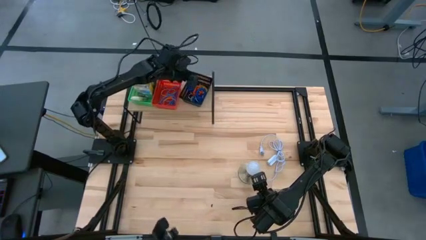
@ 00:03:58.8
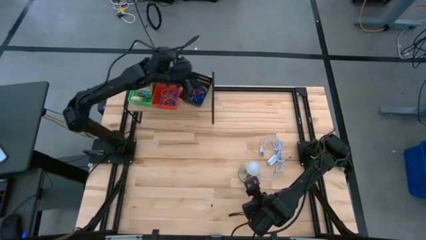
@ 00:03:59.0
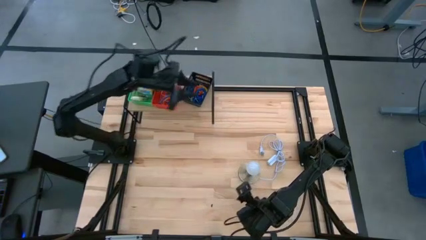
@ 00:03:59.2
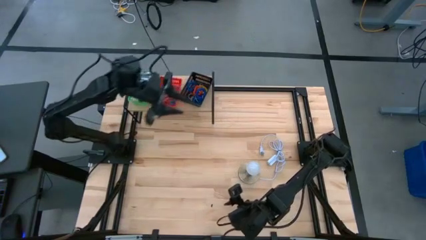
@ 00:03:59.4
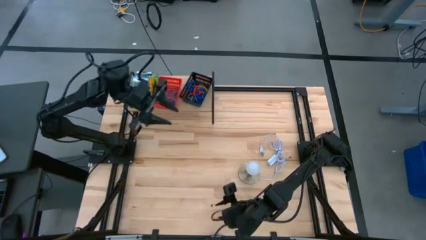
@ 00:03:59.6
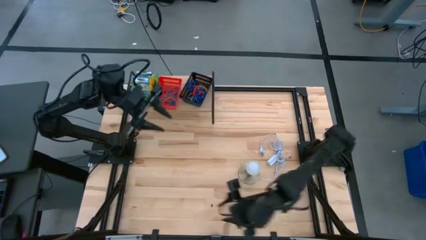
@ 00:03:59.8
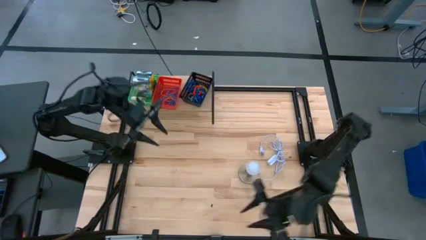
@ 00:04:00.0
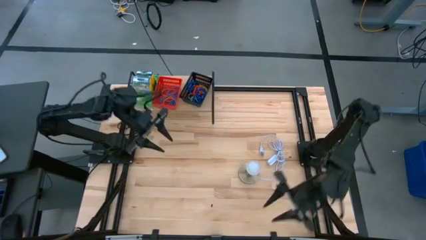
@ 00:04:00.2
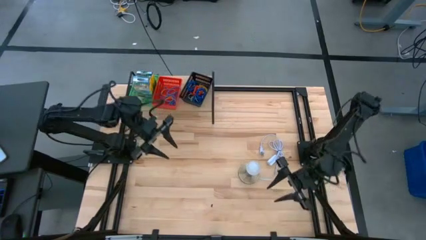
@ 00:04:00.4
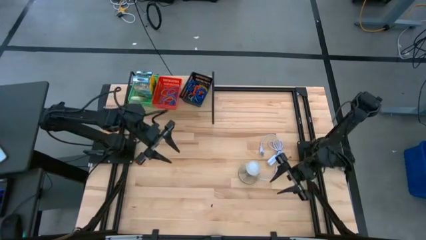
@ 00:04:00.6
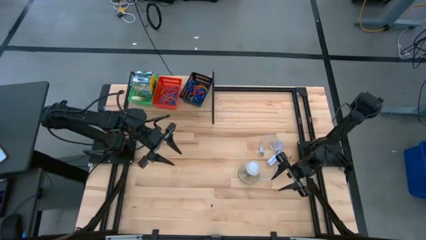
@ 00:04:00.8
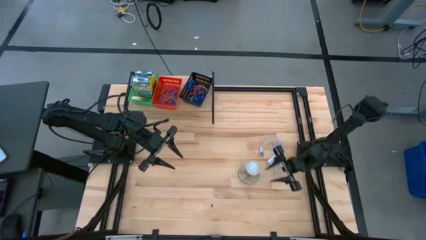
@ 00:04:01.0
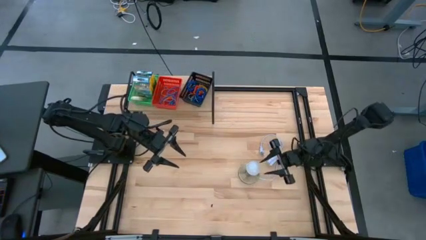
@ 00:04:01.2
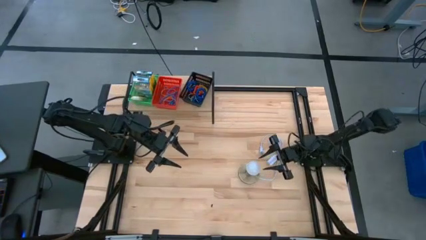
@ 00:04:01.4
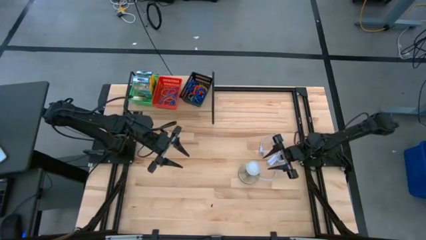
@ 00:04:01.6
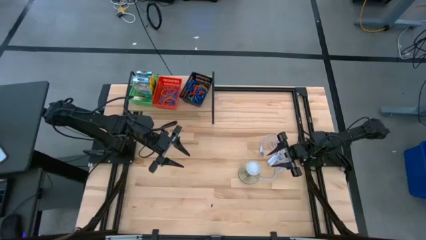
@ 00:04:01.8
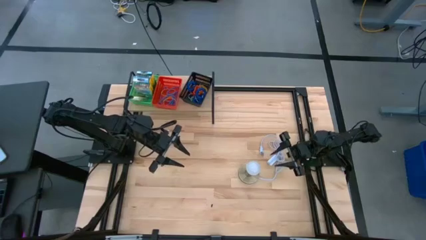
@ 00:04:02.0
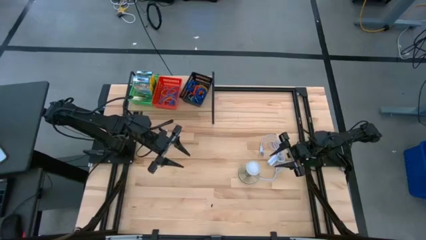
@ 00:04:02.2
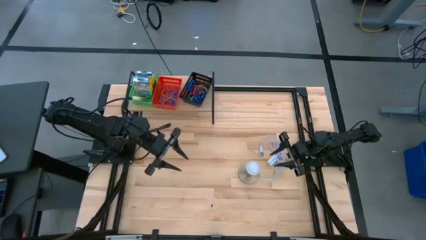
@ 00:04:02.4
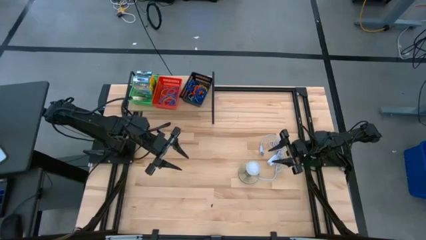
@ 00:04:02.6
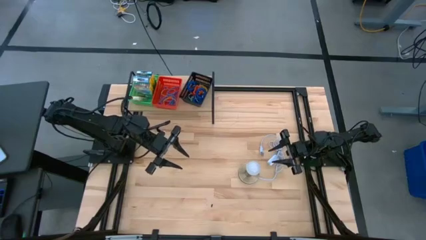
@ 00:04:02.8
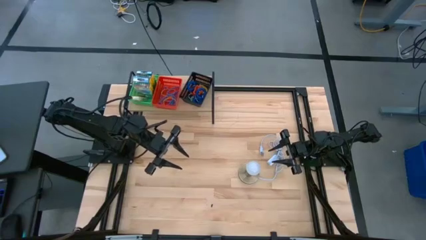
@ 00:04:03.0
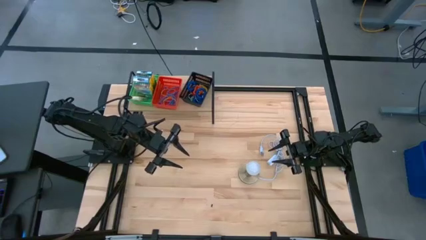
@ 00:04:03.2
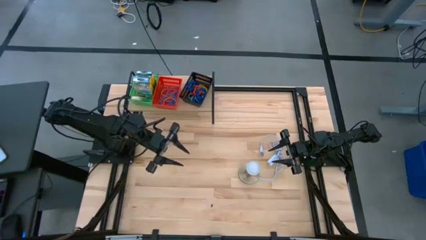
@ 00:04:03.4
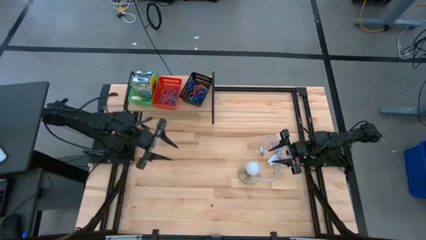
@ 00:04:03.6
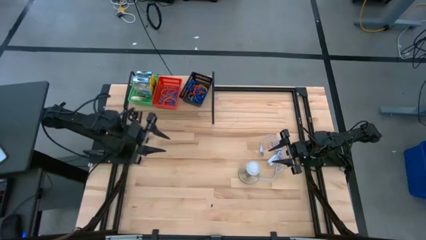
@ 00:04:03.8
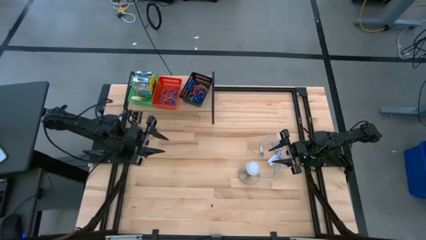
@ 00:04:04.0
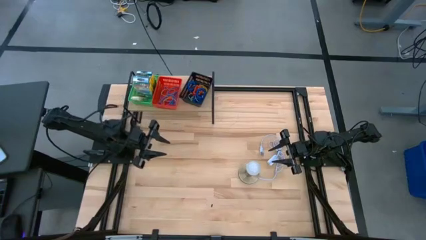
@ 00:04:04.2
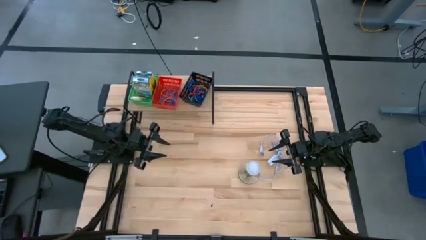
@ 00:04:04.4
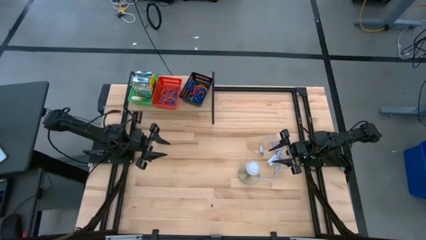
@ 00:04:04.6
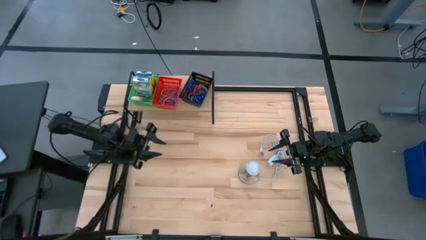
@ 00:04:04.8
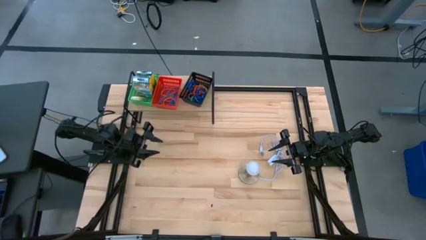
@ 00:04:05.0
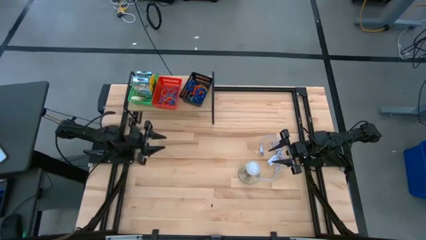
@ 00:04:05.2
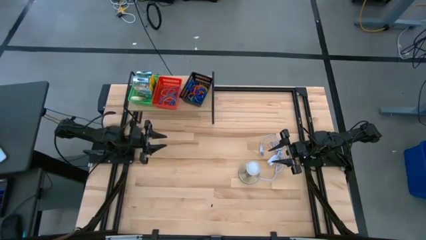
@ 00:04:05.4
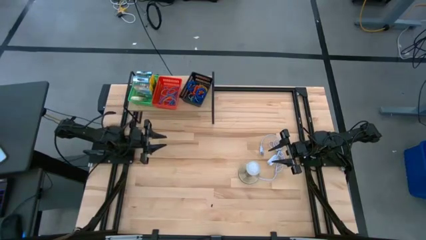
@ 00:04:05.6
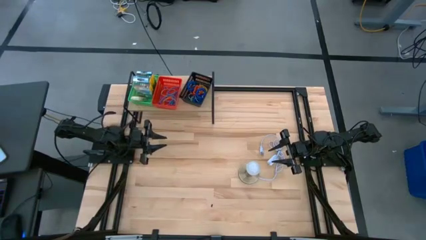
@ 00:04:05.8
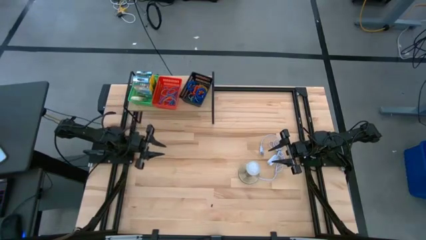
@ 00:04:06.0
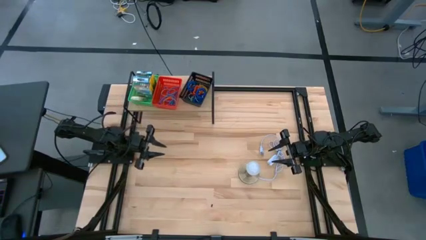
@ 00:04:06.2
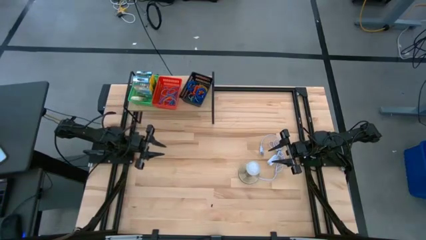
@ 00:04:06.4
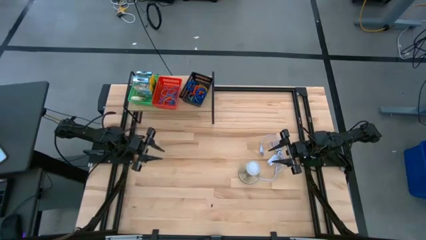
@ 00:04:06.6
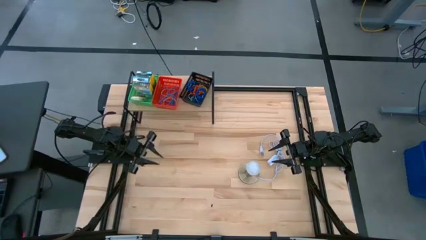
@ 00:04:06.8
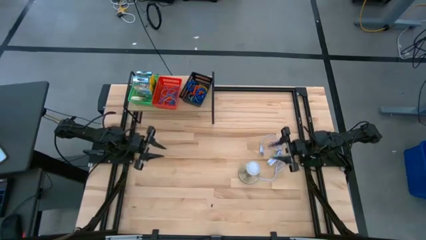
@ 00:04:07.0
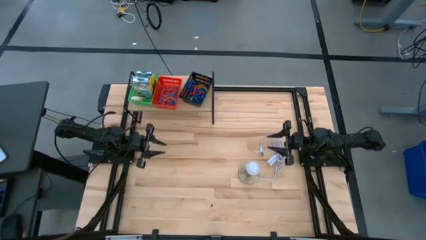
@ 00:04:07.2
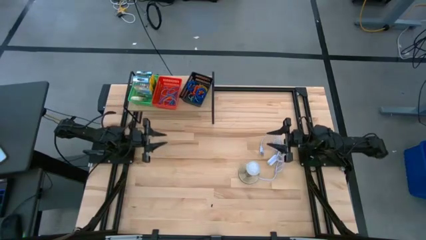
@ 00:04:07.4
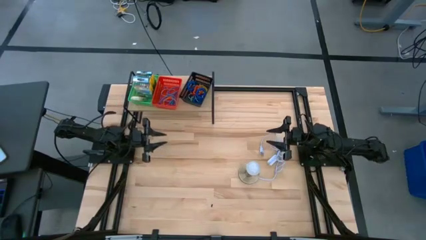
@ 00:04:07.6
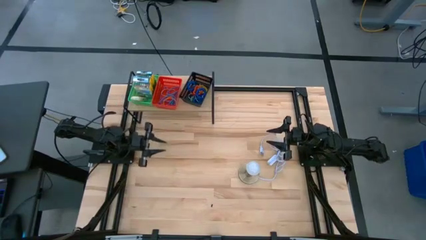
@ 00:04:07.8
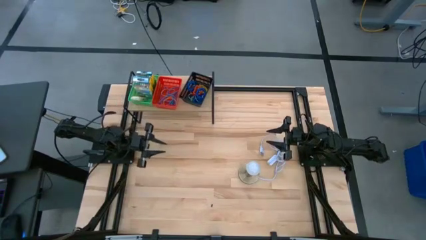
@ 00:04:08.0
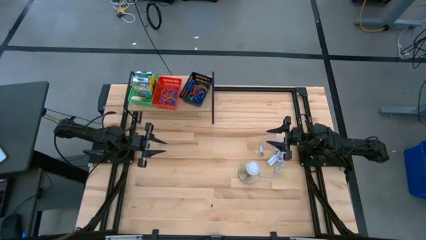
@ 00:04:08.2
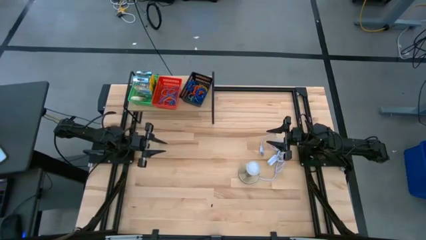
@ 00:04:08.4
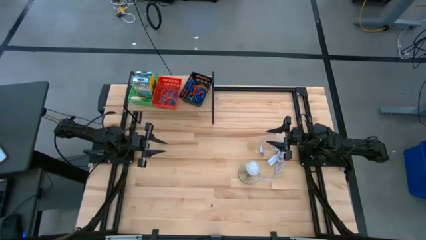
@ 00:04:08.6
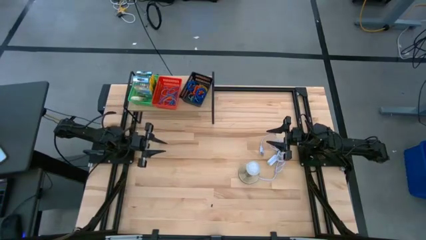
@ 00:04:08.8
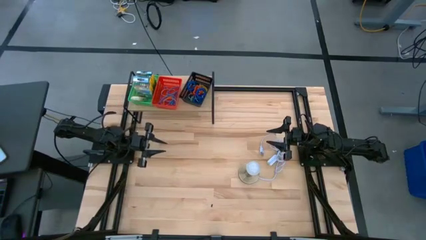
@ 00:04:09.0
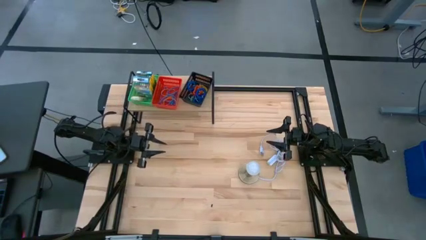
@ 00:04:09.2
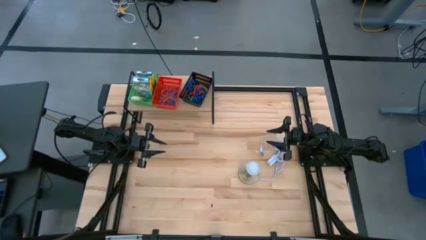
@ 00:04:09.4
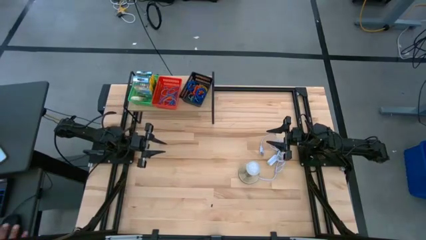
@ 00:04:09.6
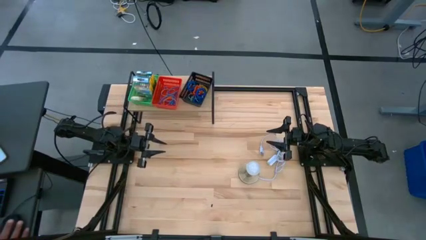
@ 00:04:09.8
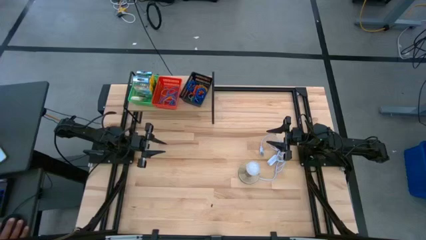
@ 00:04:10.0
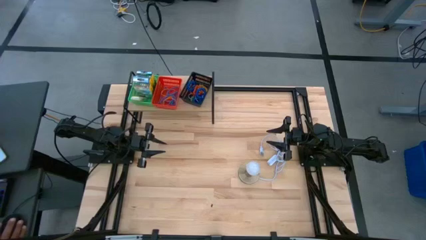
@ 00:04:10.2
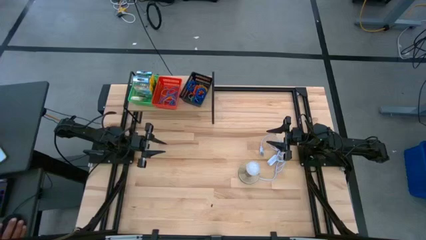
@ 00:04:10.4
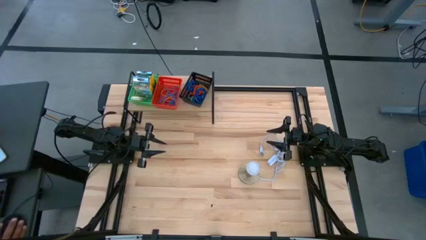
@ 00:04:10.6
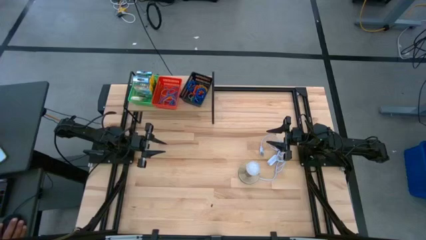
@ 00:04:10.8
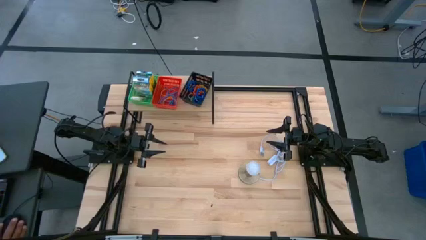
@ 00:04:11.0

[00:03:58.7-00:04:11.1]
Task: Pick & Place Office Desk Supplies
Return to Home Position
